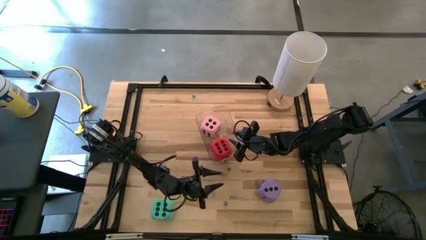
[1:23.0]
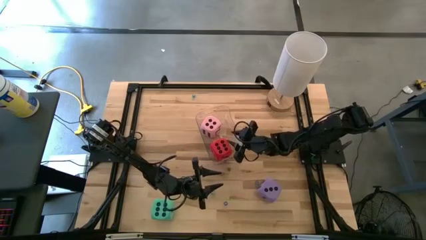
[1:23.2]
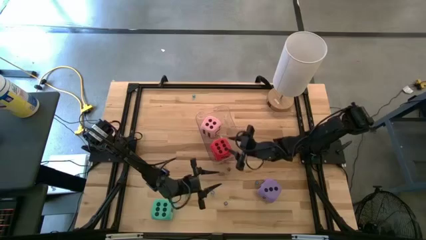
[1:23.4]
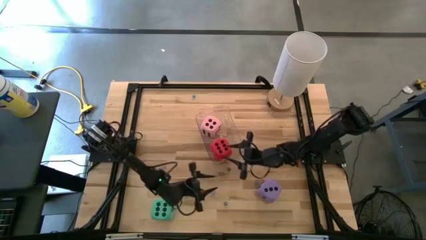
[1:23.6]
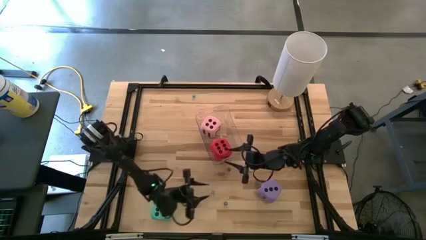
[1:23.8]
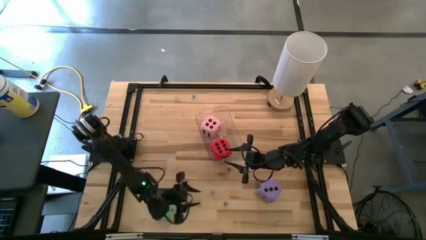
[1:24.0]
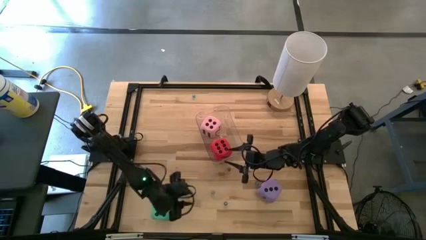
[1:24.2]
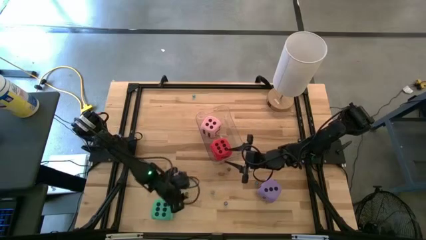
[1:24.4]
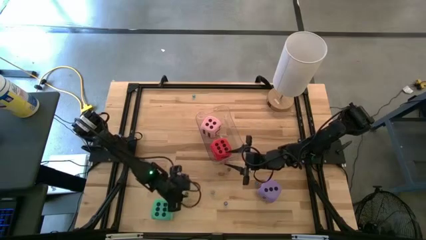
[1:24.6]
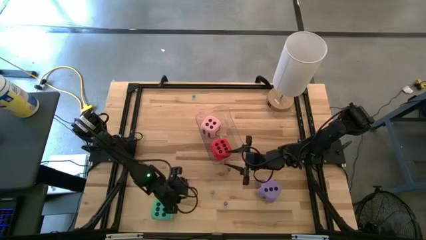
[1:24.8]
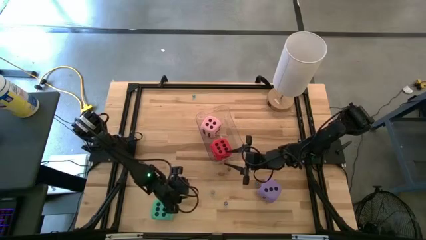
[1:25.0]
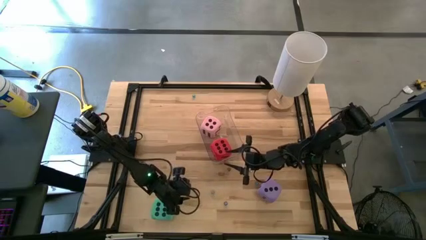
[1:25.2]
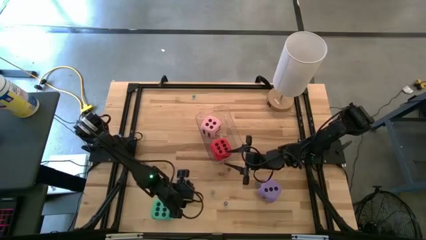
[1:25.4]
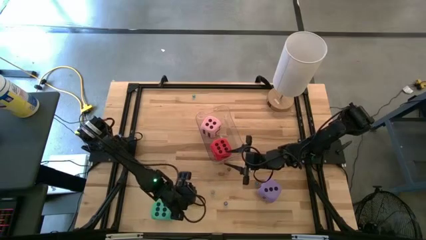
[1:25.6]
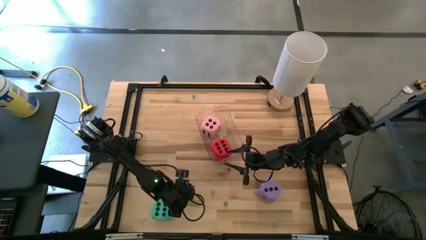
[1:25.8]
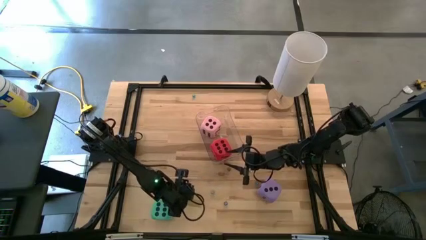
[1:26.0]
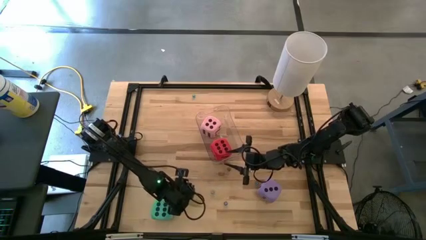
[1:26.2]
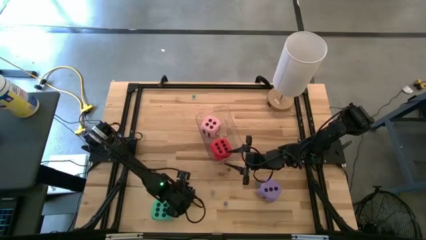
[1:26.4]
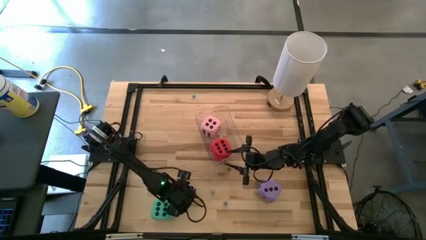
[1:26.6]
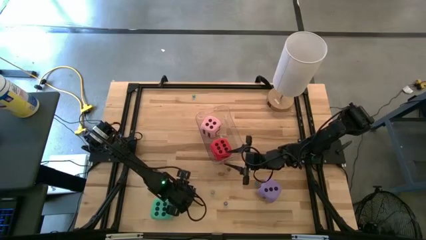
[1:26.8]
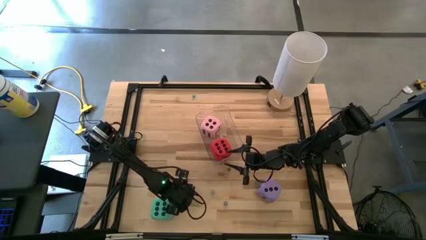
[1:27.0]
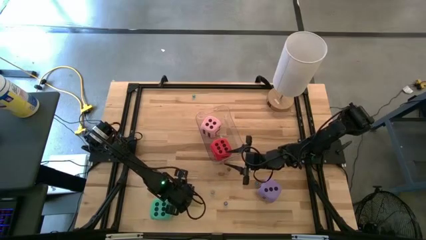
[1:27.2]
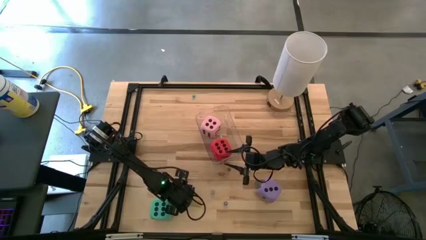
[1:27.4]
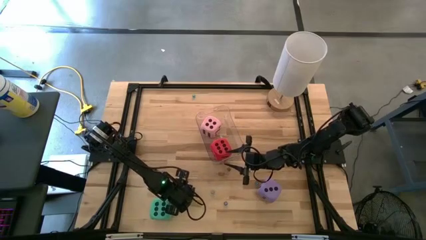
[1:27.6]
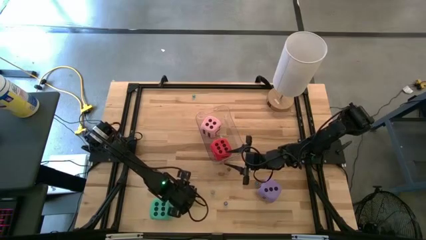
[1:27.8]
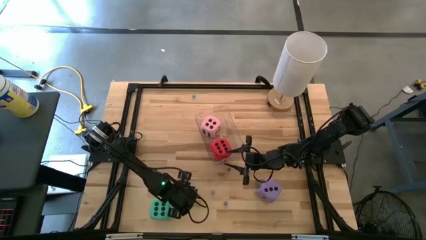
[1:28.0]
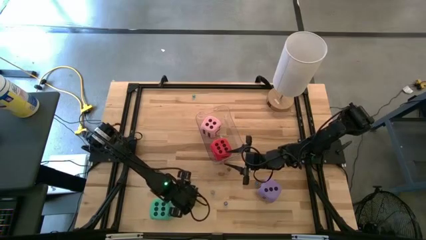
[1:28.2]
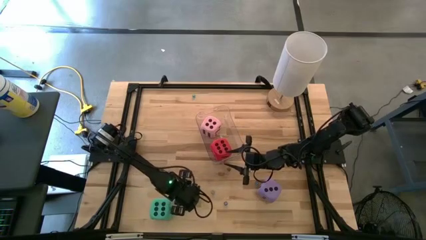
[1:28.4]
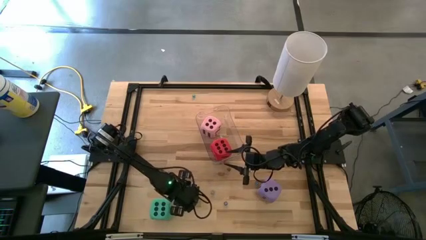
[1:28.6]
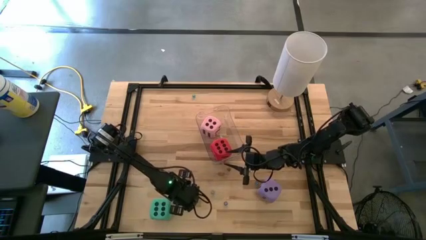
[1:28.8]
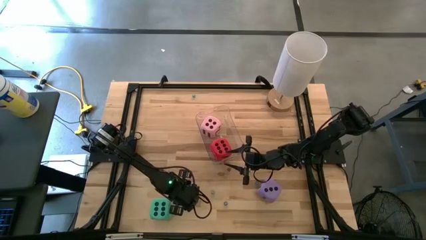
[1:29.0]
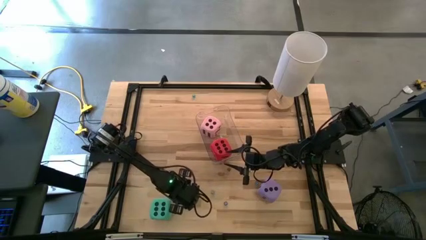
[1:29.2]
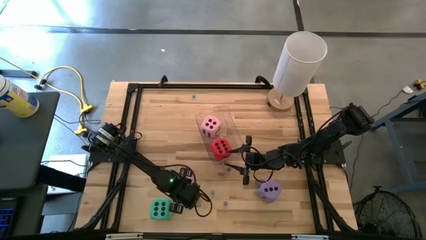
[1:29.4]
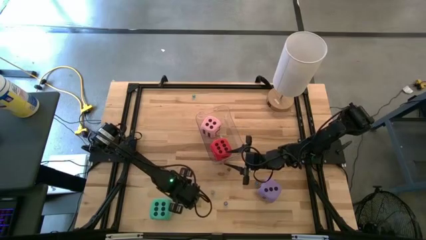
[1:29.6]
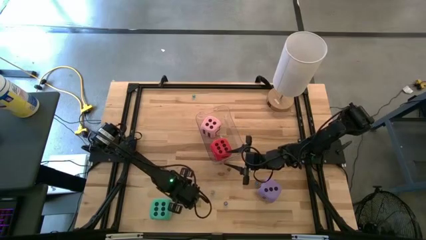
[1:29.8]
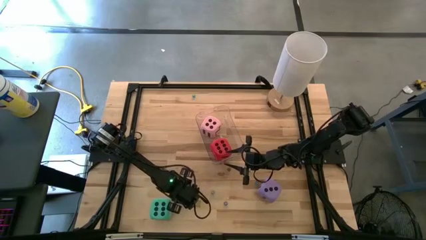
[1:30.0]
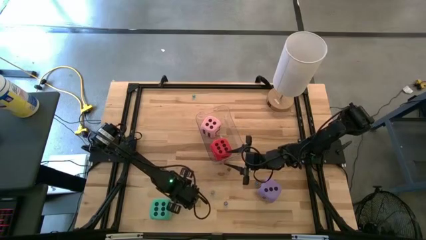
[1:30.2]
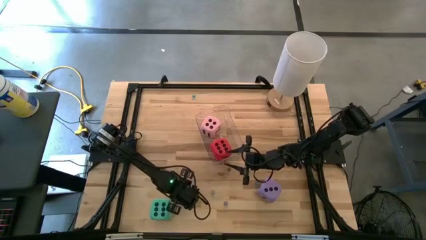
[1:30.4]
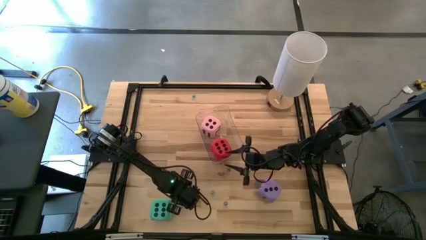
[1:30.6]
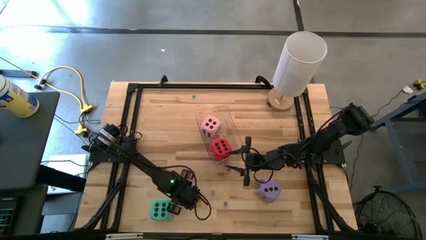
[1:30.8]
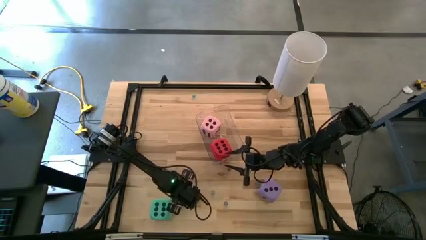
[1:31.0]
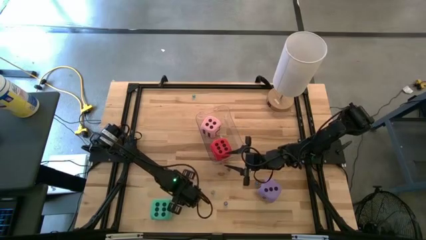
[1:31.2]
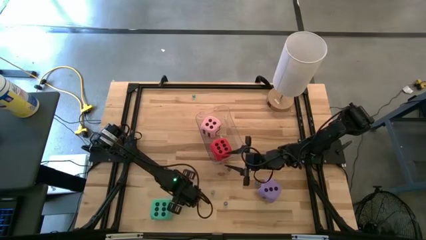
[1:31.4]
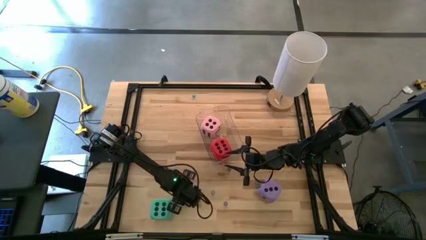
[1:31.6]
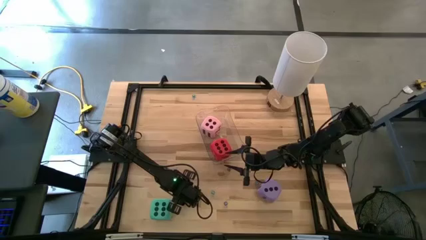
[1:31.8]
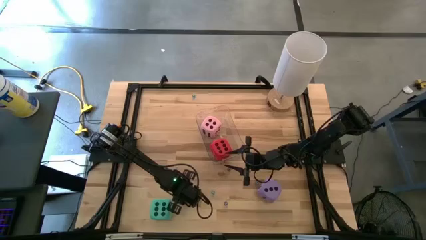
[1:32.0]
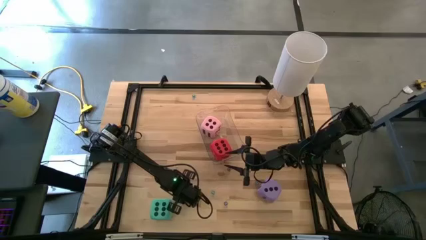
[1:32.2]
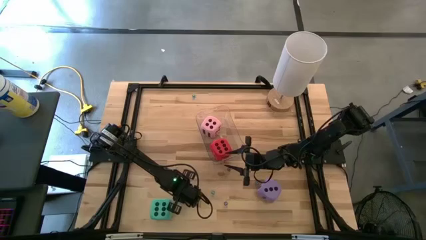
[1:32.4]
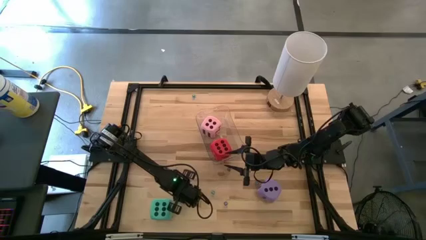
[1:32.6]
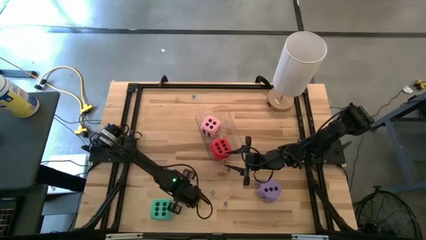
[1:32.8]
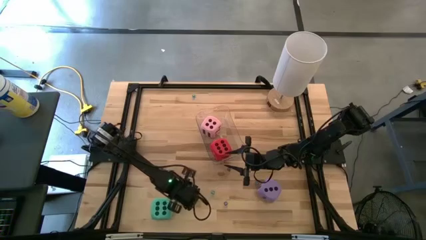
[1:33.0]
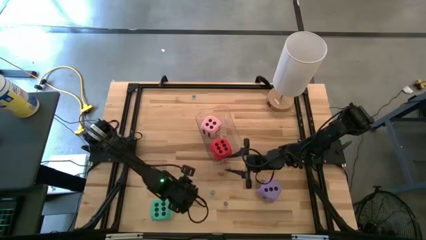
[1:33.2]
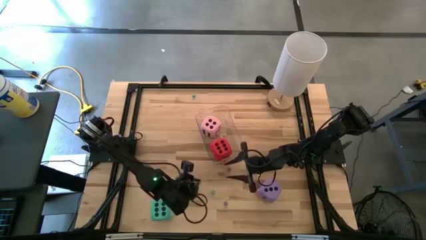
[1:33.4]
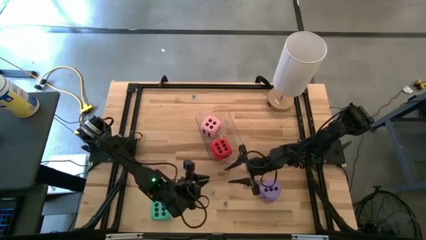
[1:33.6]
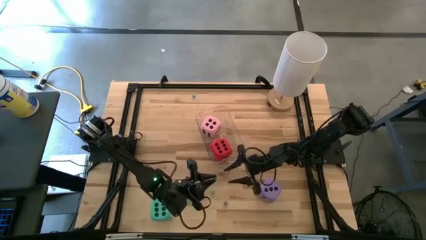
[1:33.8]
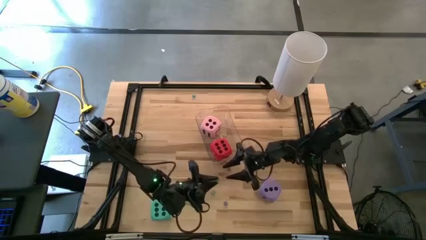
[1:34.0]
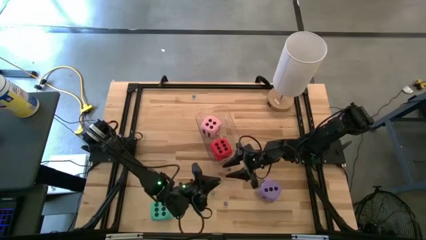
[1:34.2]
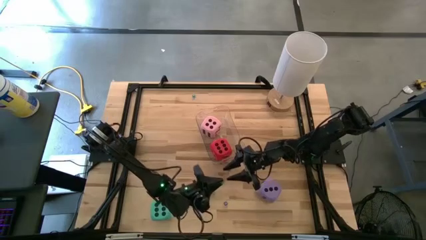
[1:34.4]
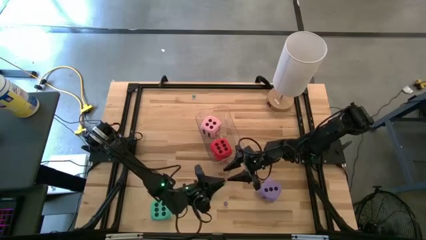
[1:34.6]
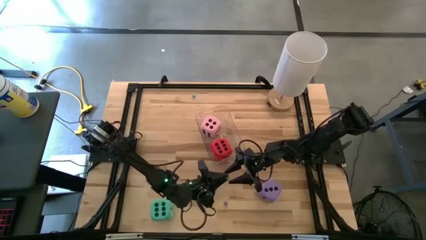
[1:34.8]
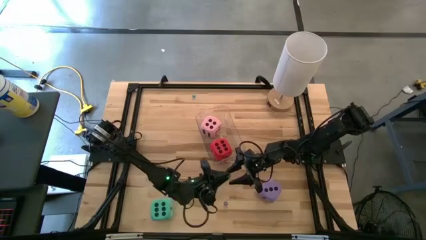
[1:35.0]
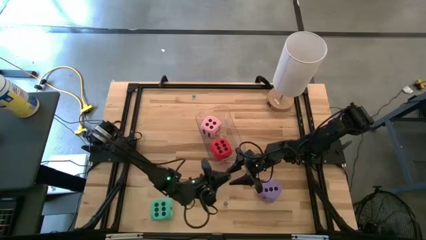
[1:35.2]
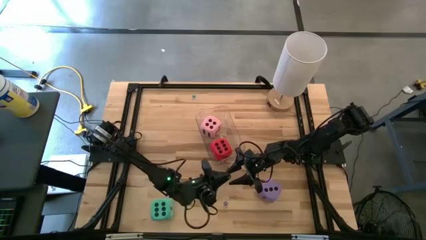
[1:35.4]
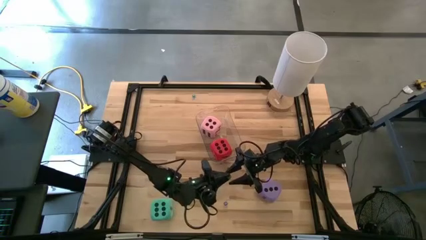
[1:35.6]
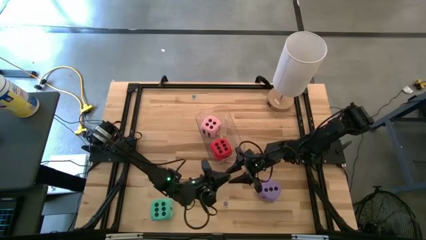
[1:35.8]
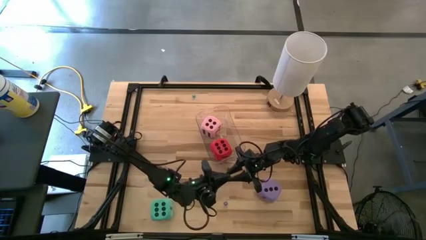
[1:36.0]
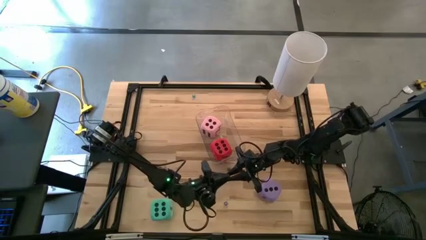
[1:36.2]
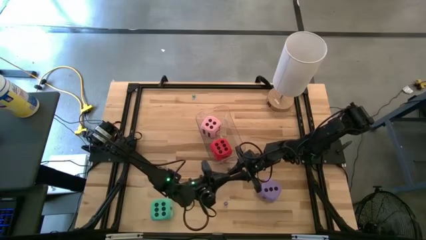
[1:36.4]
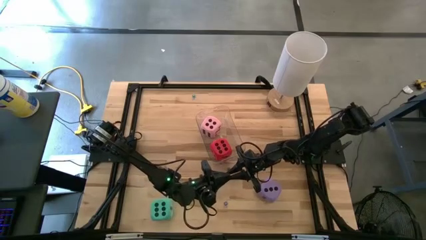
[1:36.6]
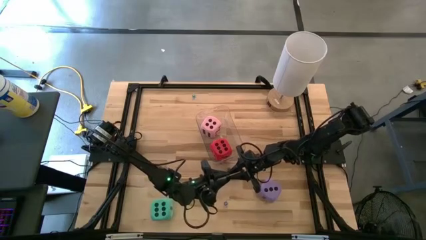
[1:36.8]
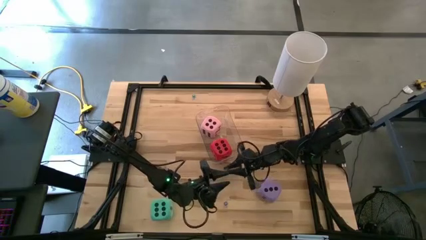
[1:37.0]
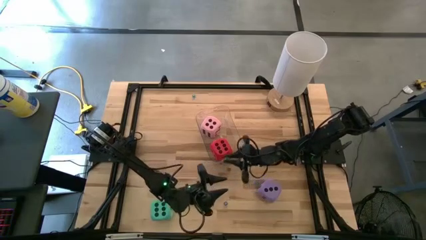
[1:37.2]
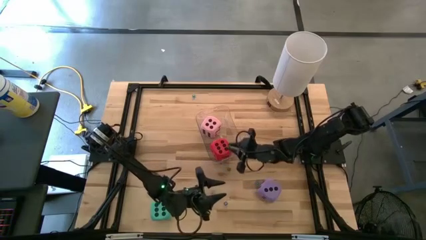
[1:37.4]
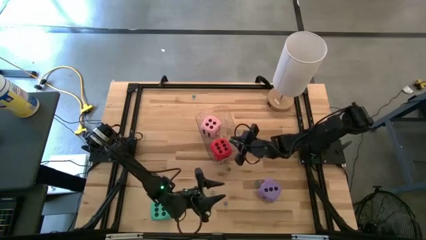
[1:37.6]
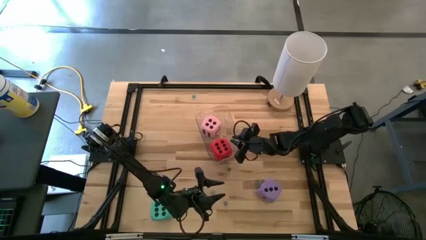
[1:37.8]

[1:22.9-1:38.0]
Task: Pick & Place Dice
Put the small dark green dice into the transparent bin

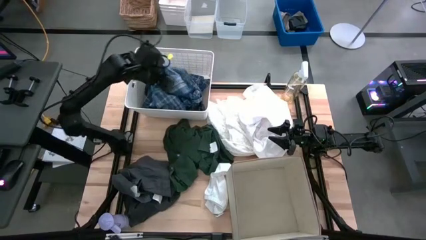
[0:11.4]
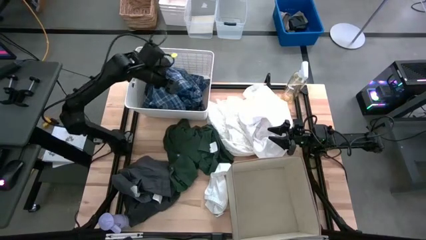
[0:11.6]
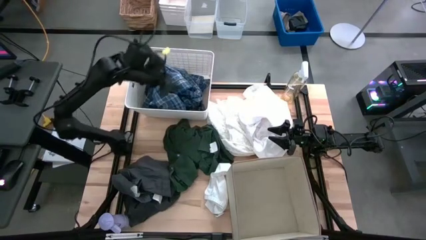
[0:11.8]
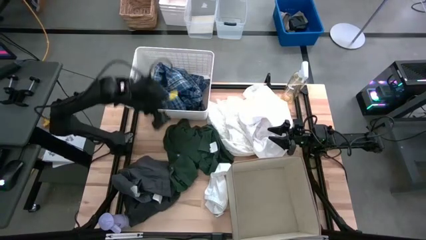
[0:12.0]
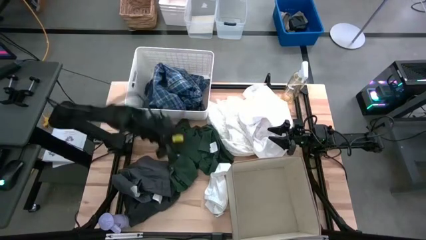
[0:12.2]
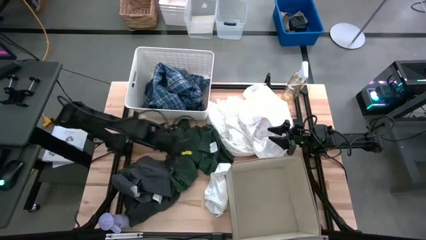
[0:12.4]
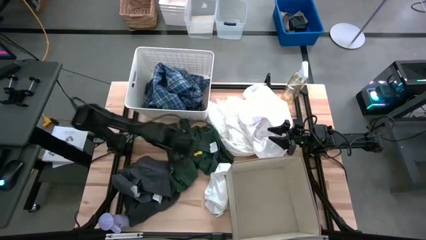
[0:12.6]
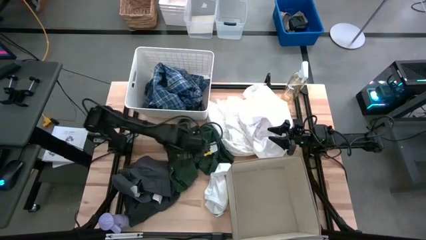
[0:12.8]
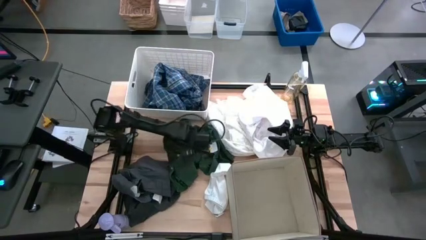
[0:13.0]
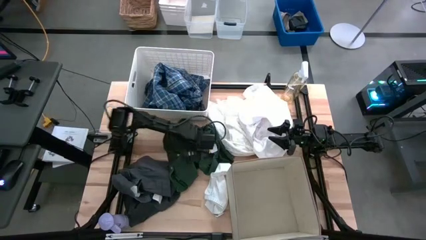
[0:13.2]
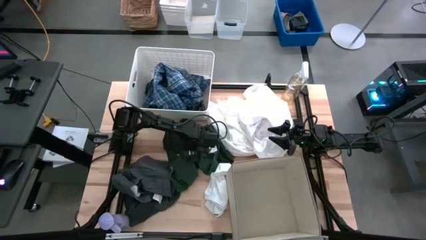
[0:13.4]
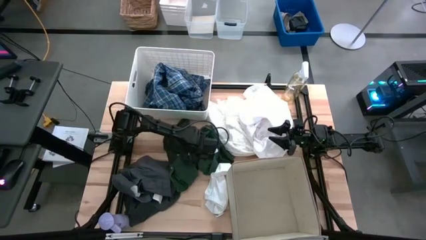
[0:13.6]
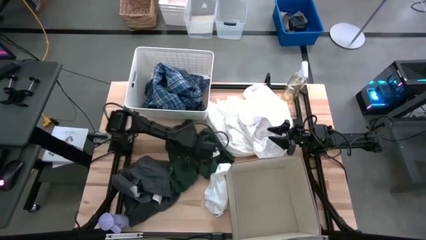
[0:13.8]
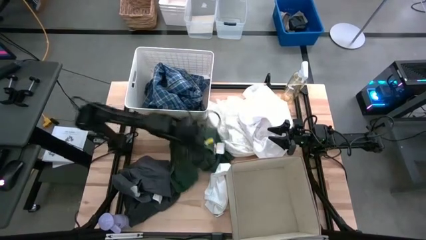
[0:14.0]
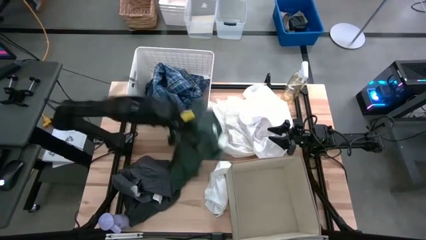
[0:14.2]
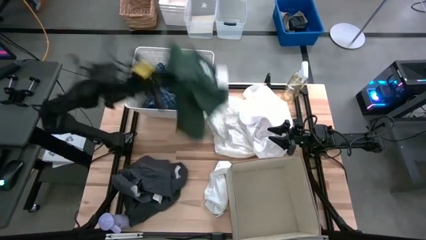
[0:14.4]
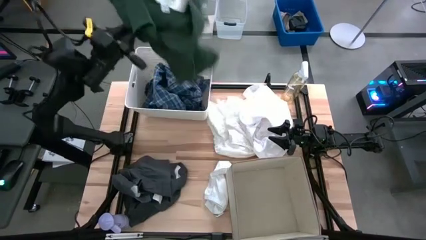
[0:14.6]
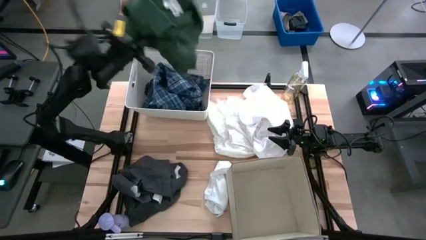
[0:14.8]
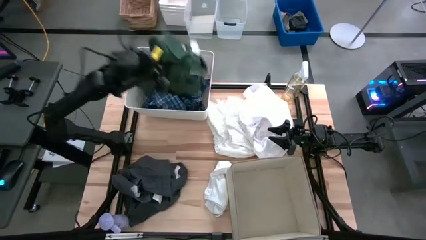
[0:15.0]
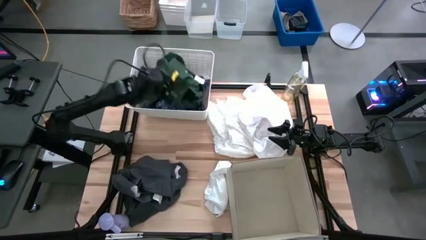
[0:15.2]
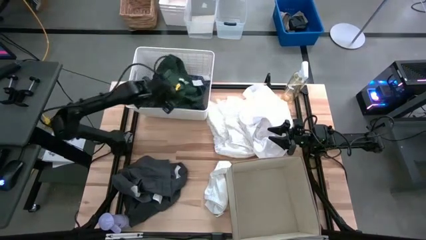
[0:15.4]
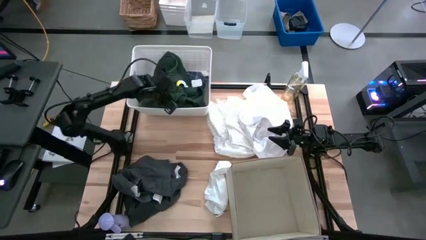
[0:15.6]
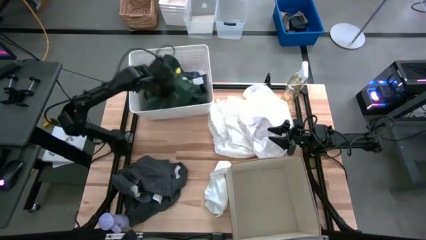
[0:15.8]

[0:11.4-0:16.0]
Task: Sort clothes
Put the green shirt into the top white laundry organizer
